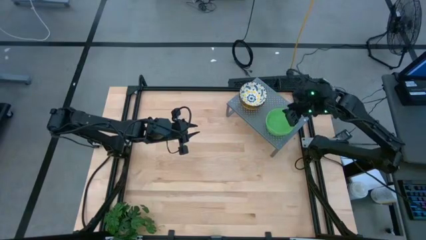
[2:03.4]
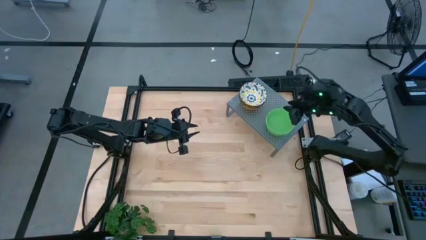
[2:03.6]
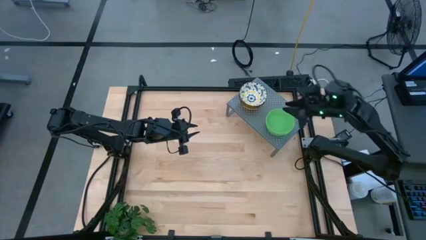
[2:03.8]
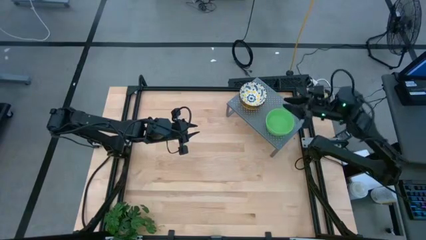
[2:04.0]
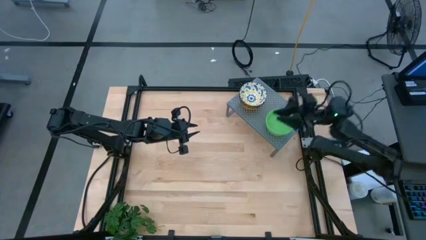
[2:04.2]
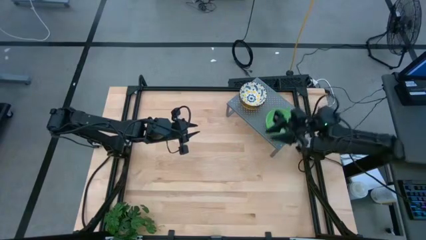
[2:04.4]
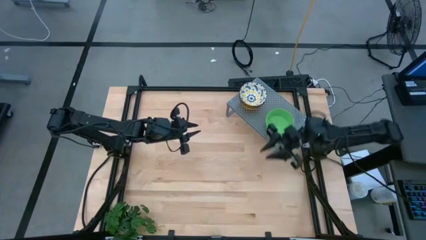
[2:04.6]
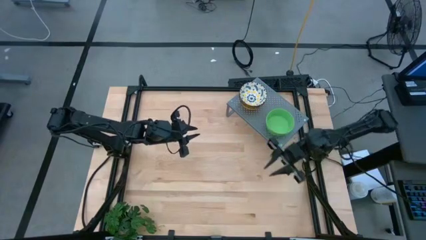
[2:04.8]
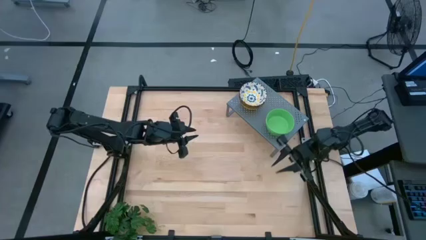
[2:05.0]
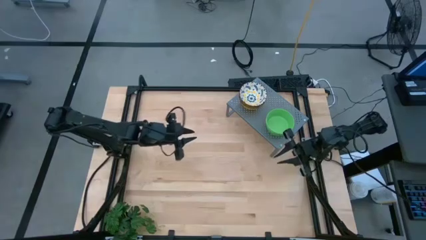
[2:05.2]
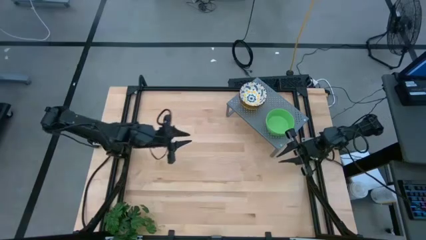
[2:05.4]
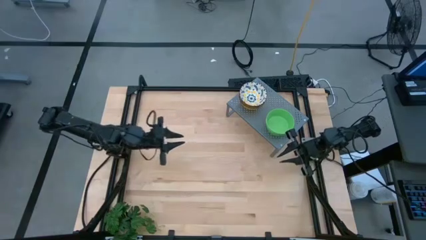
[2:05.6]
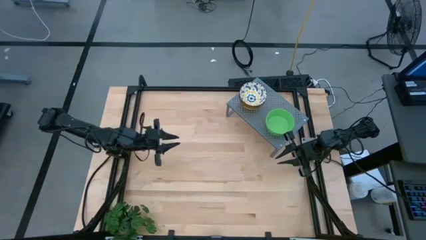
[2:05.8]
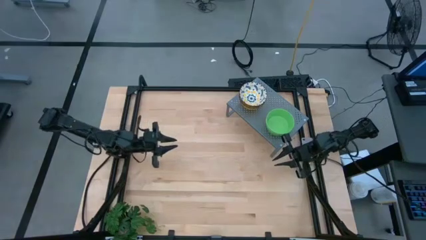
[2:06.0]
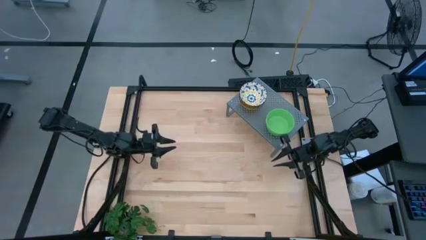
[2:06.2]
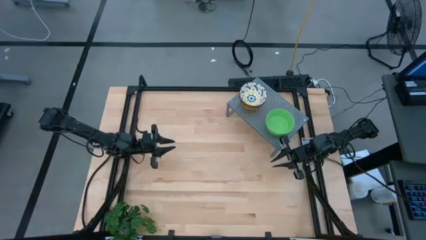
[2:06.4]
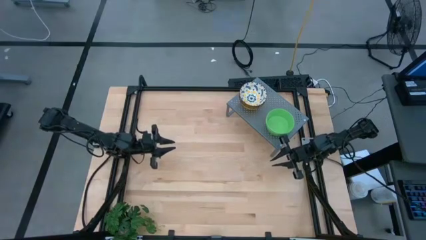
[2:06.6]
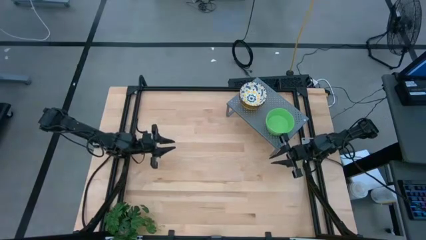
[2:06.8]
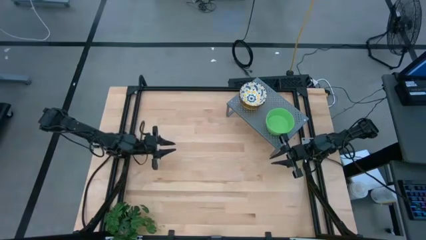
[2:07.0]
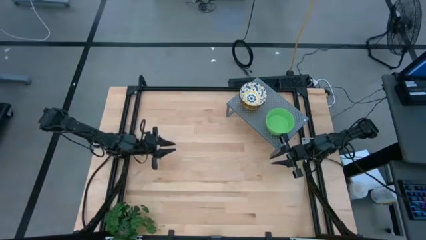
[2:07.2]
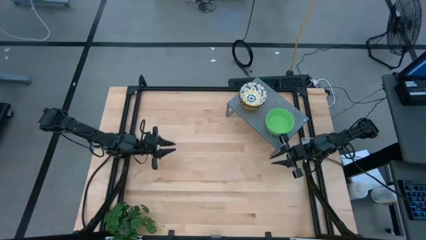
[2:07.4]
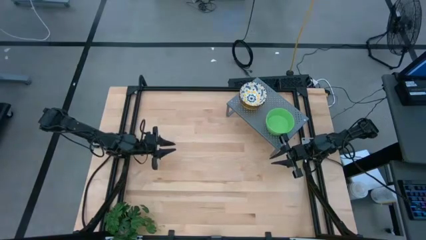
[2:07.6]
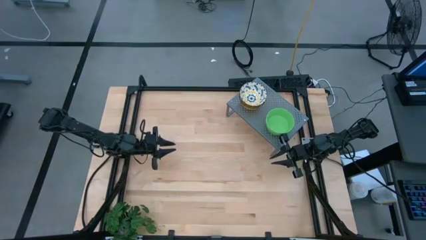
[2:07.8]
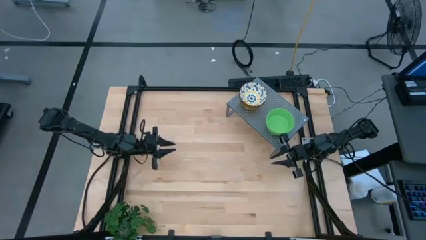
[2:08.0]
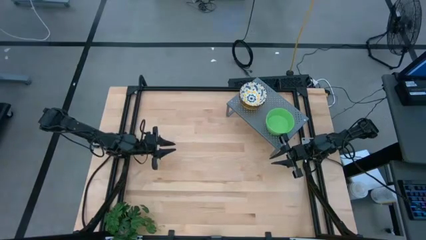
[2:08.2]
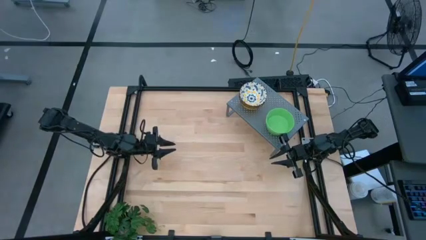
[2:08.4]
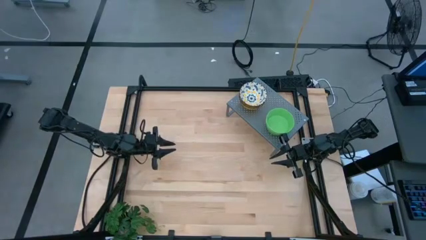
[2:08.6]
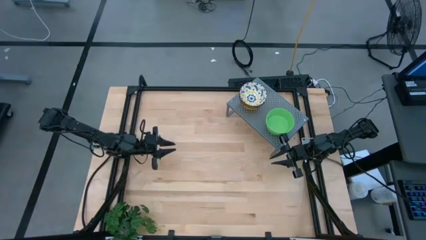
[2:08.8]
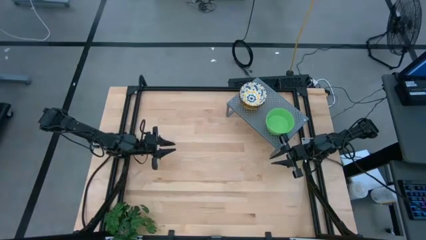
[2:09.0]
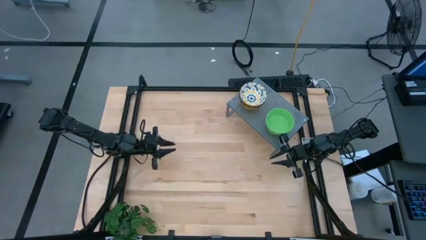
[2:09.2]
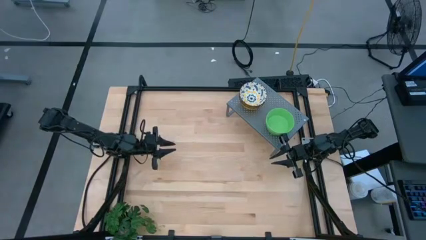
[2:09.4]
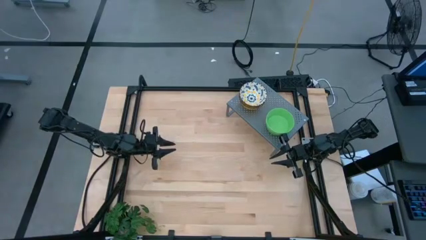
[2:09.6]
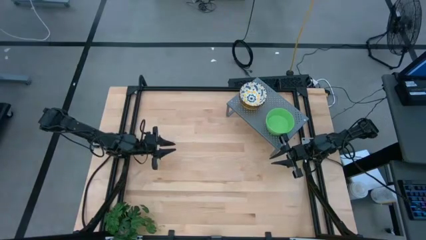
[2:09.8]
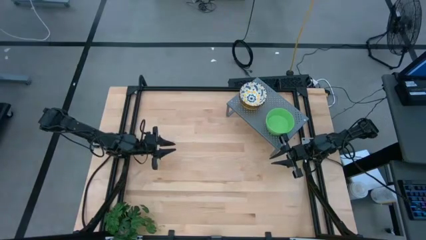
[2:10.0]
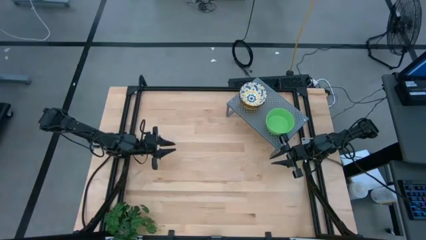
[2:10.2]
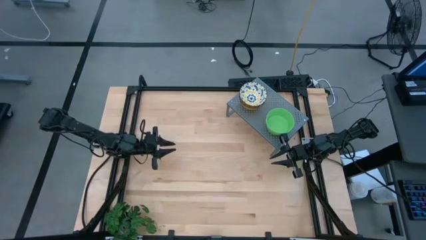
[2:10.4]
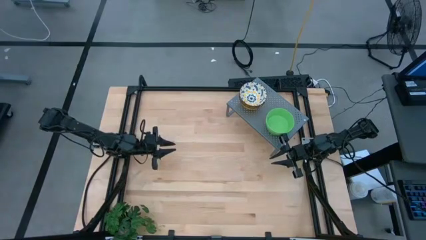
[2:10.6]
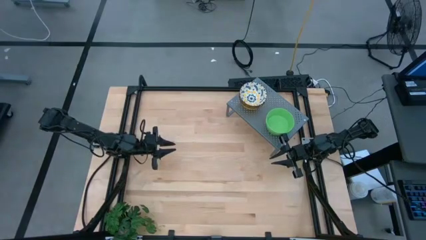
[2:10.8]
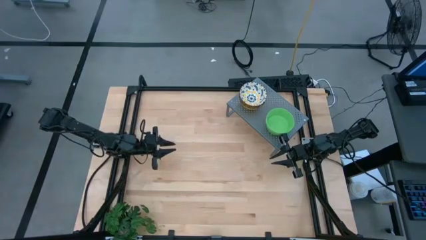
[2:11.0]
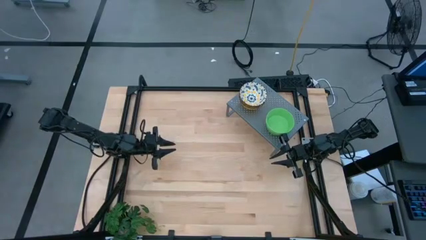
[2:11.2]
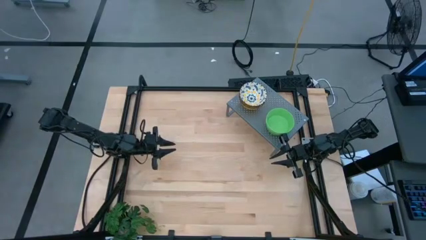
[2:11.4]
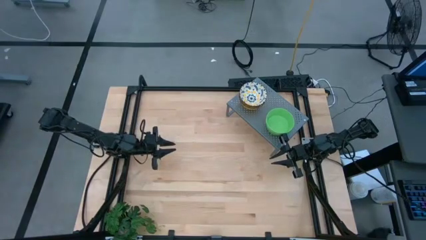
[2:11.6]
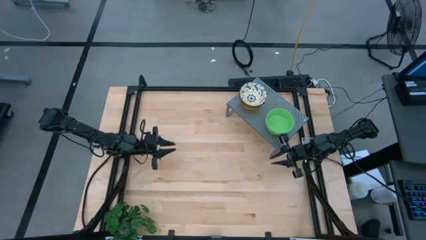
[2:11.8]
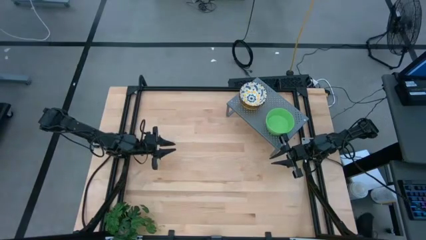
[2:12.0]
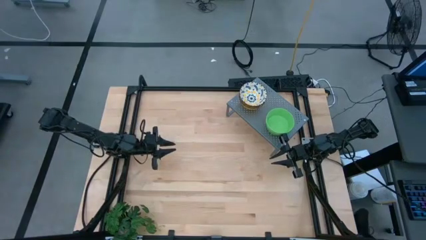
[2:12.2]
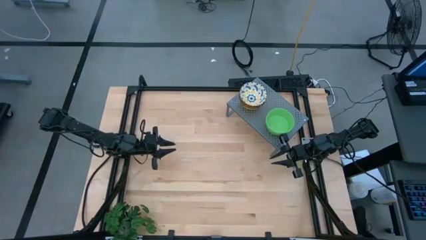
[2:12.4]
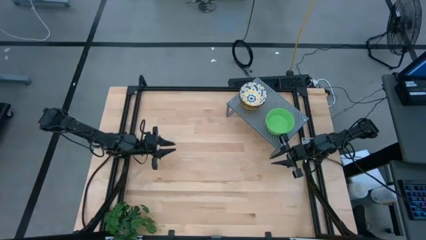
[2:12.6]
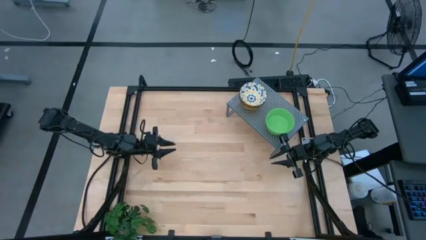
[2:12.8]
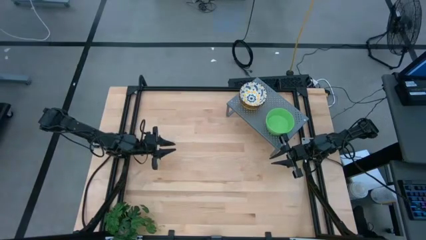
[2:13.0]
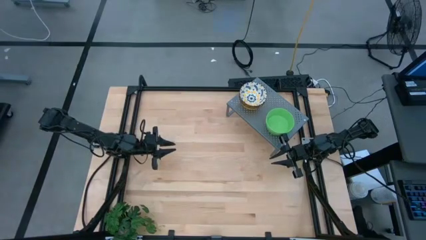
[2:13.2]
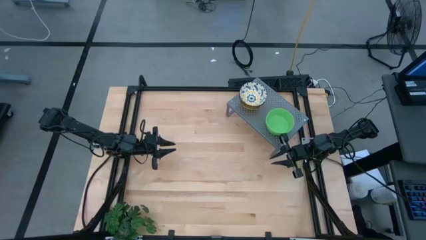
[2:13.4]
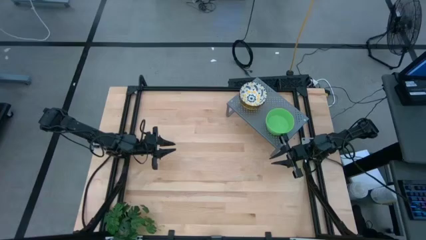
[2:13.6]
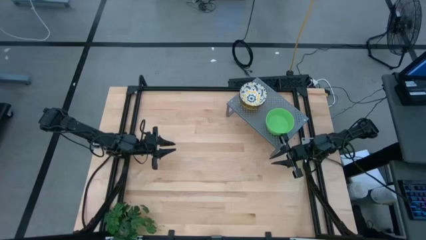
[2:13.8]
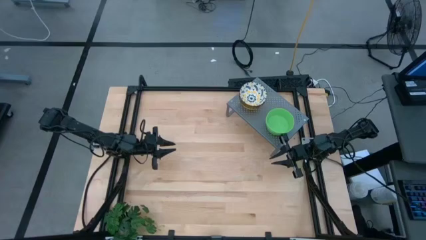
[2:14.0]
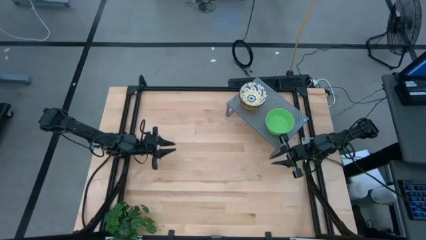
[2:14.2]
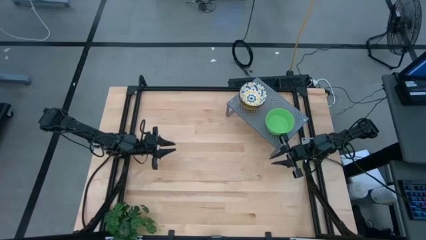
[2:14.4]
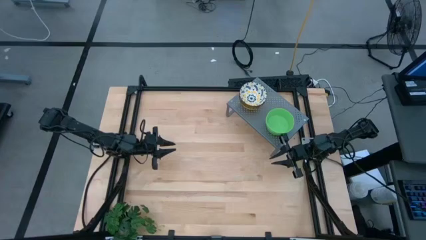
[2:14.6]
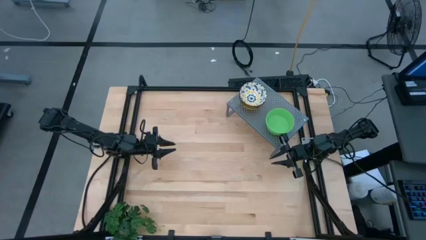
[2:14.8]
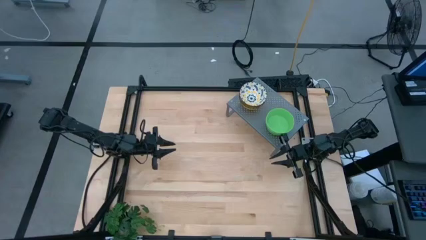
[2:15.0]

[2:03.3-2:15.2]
Task: Pick & Place Mini bowls
Return to Home Position

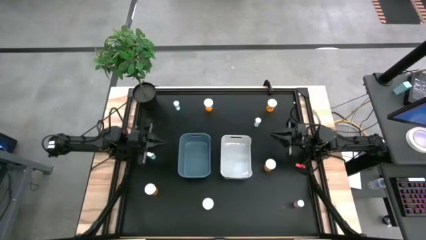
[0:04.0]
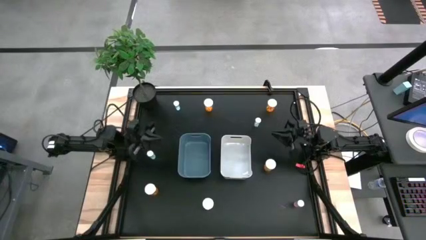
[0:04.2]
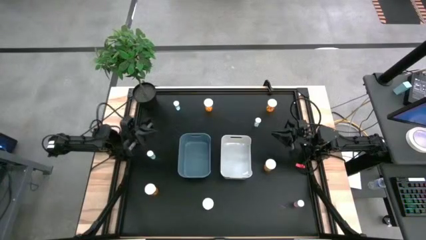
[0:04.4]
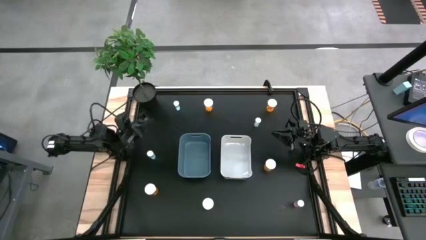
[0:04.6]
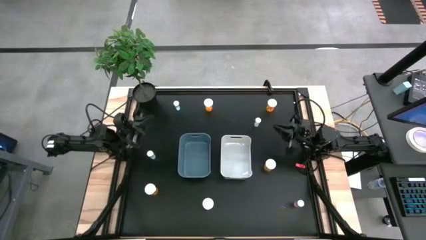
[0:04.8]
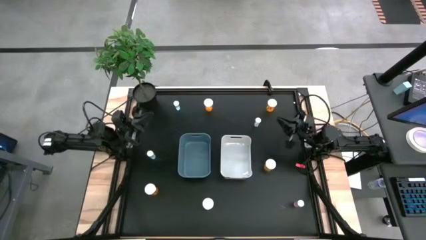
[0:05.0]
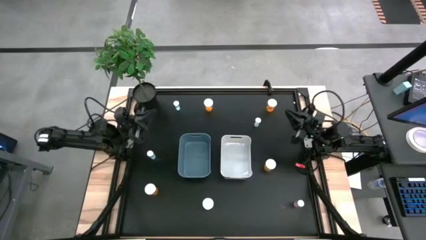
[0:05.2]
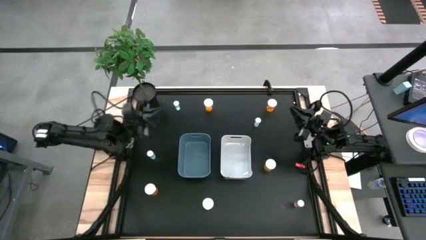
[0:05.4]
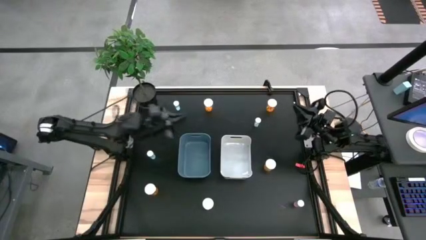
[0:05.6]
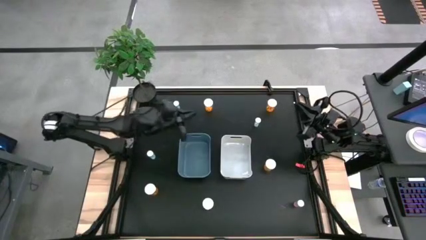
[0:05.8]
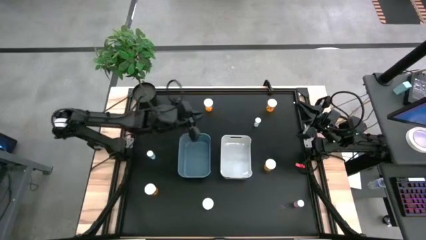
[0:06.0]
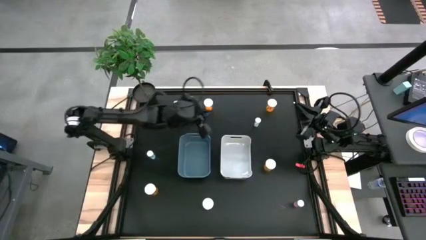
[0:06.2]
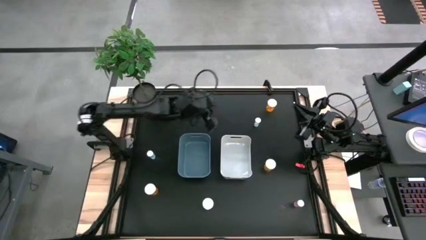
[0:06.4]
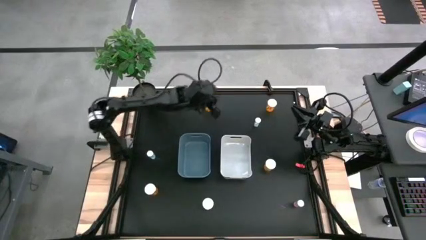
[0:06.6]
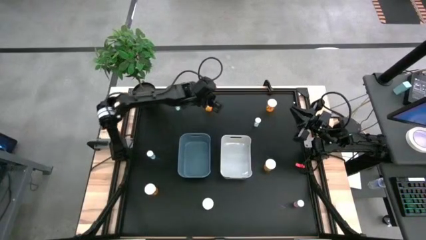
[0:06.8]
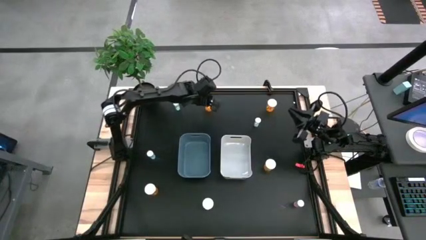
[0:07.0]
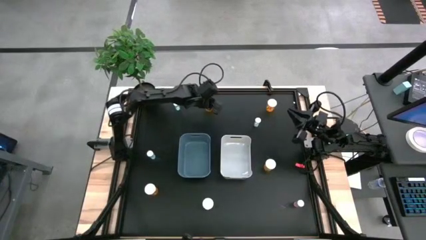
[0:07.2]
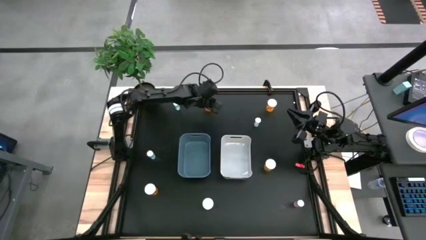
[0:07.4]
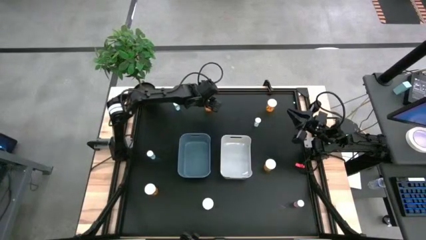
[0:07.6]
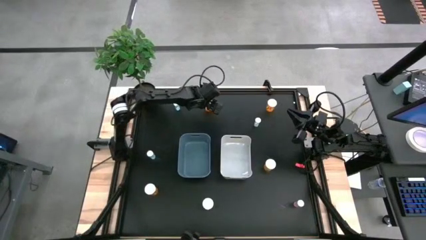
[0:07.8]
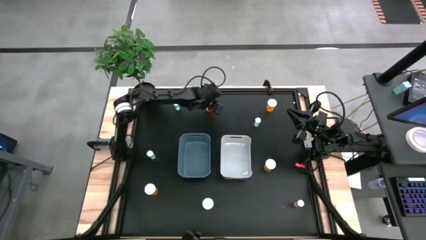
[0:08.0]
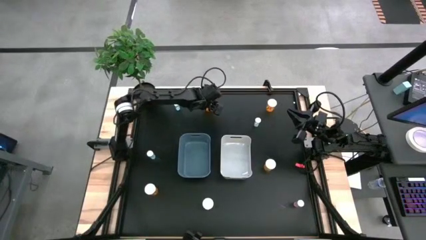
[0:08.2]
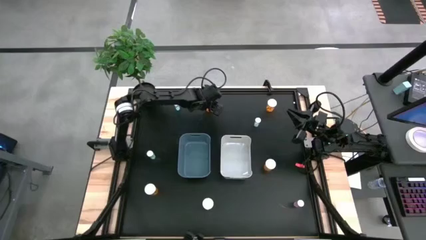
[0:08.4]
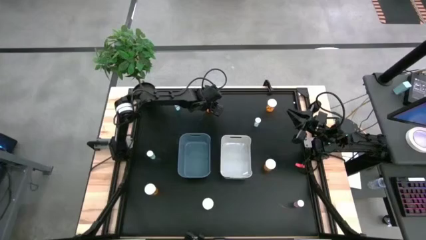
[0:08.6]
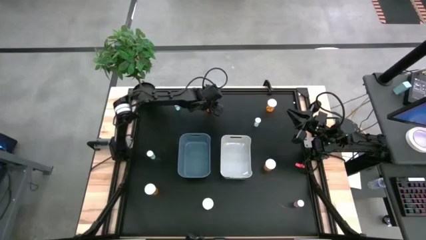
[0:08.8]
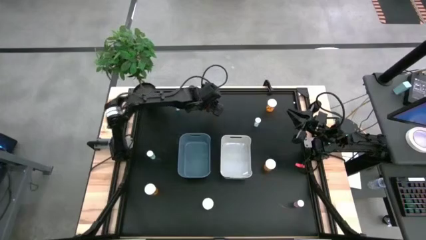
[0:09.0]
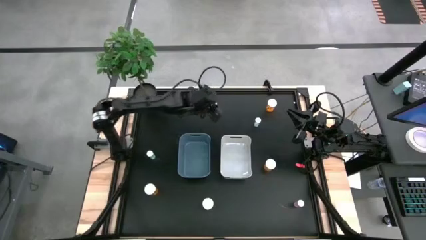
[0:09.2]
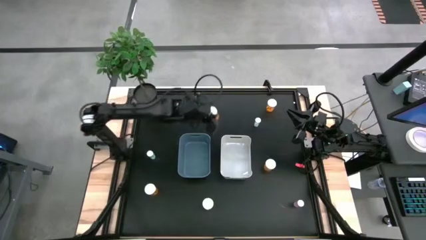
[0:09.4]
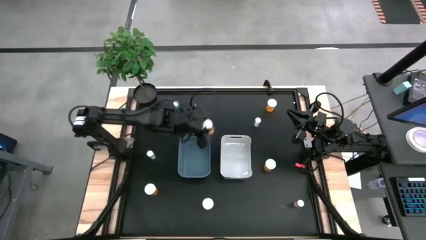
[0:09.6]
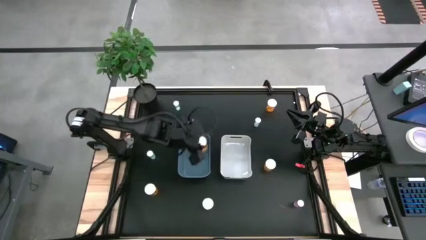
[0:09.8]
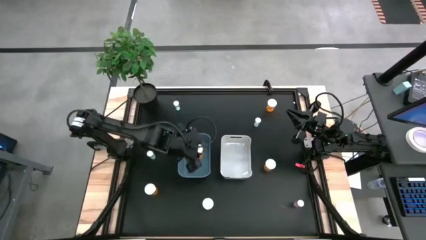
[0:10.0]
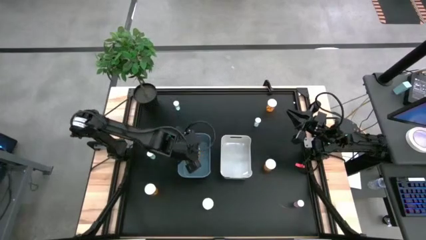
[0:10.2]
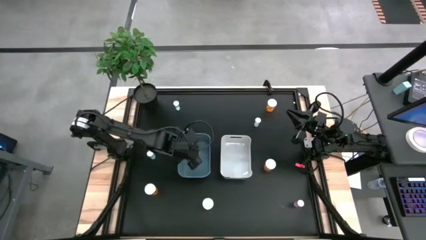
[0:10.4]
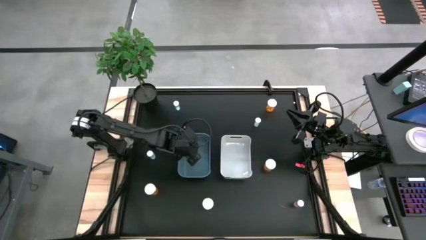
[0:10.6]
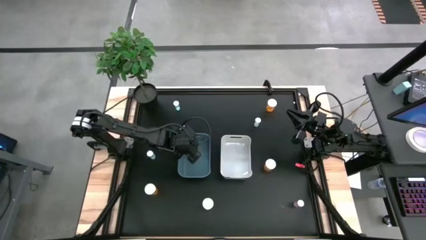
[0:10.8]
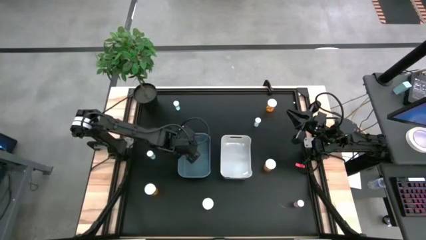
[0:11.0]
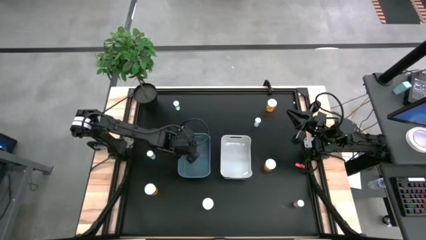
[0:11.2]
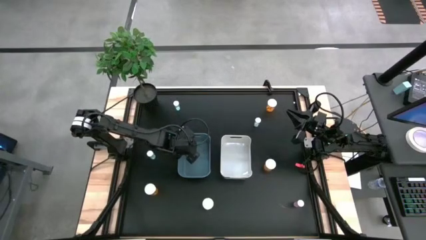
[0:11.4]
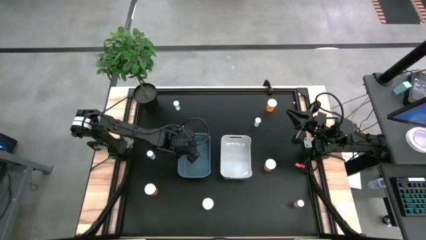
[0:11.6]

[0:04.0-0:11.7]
Task: Pick and place medicine bottles into bin by pill shape (circle, oval)
Put the orange capsule bottle into the blue bin
